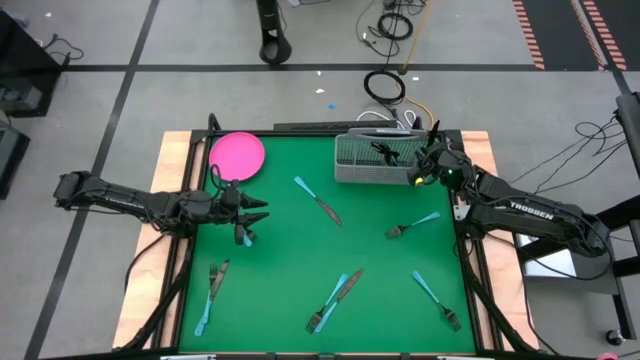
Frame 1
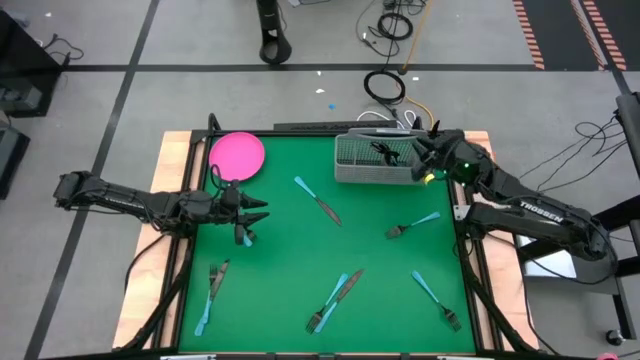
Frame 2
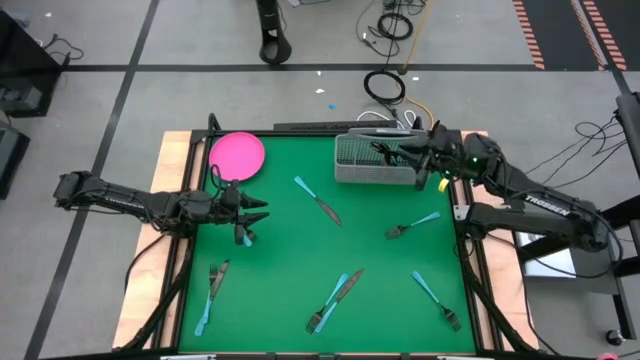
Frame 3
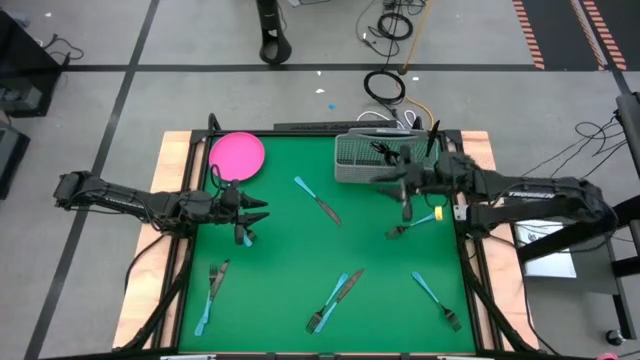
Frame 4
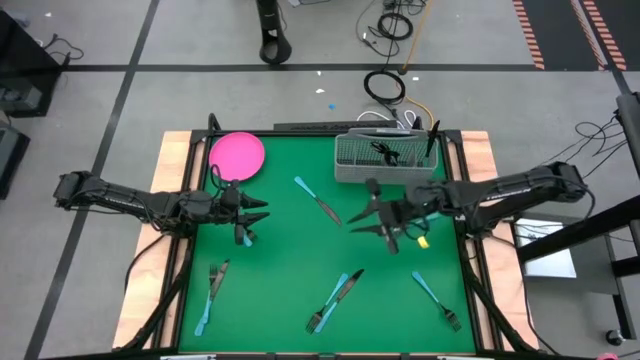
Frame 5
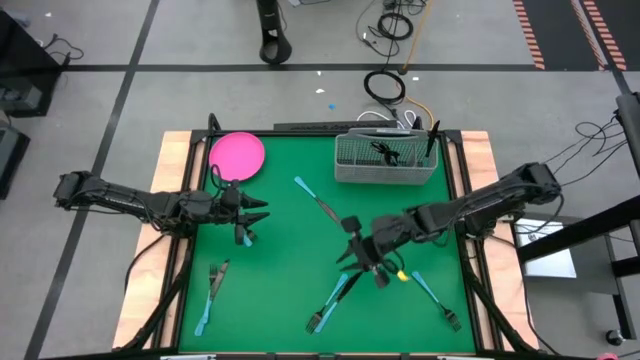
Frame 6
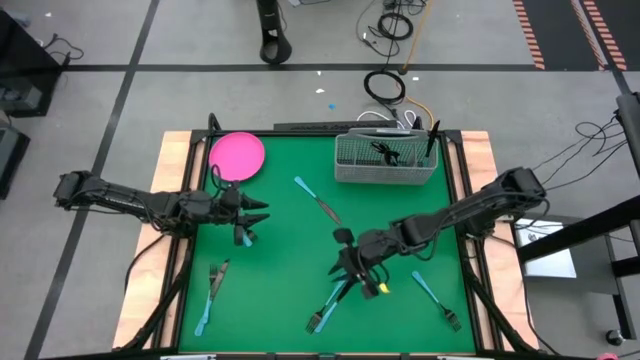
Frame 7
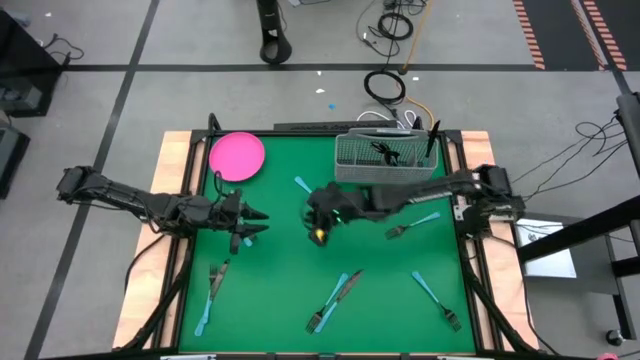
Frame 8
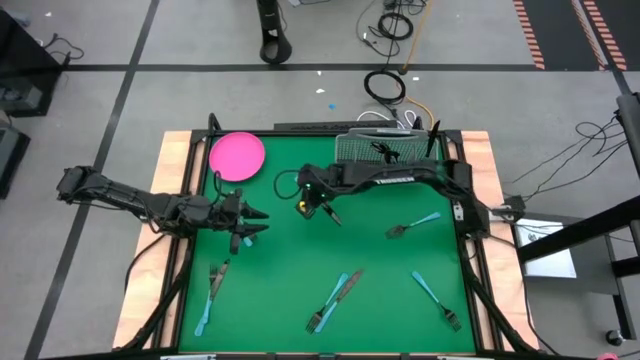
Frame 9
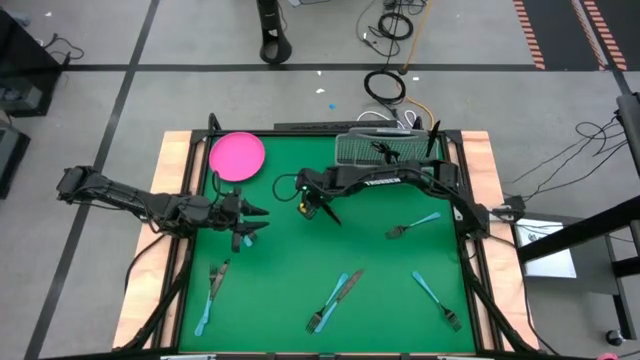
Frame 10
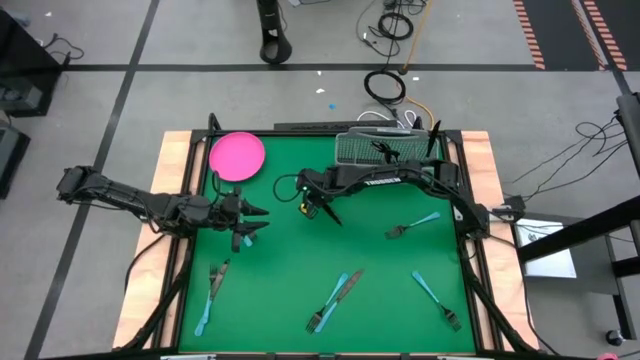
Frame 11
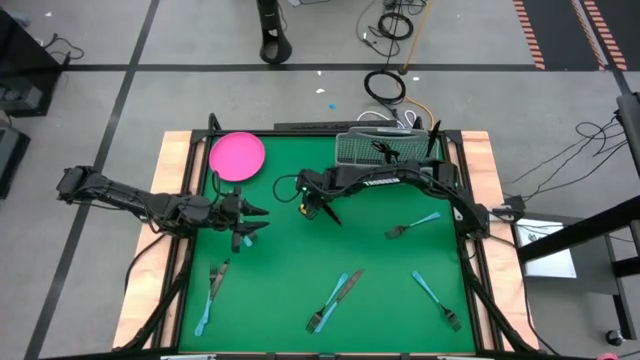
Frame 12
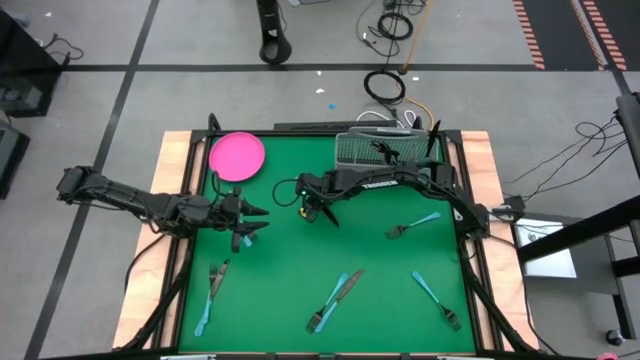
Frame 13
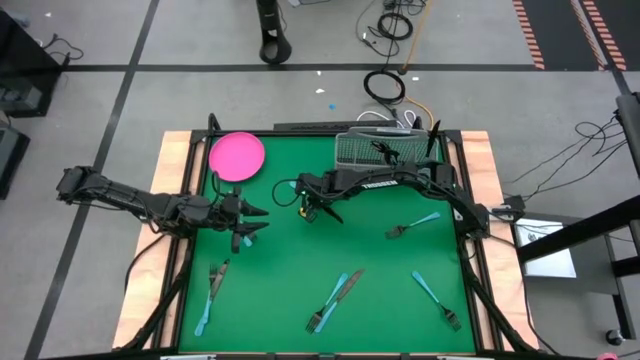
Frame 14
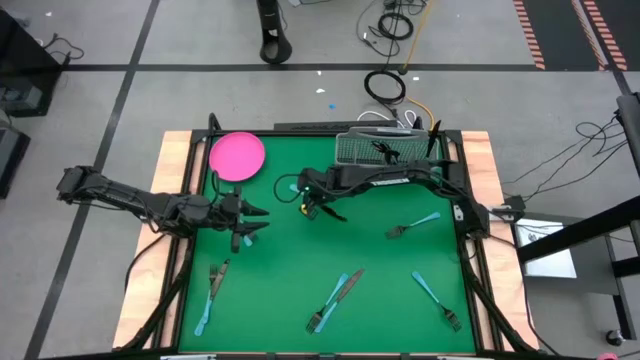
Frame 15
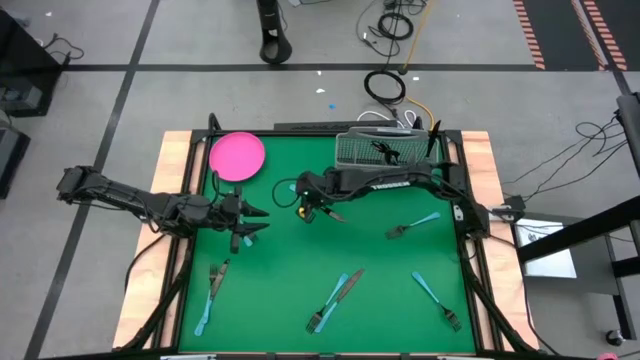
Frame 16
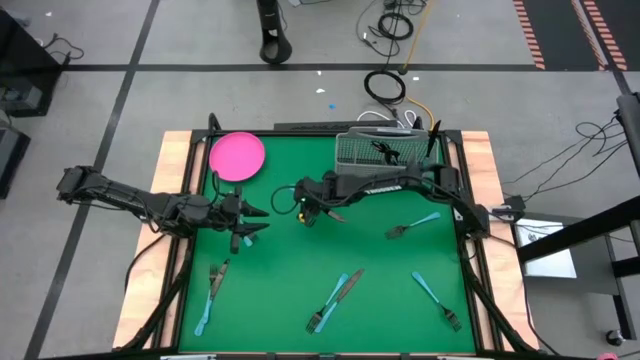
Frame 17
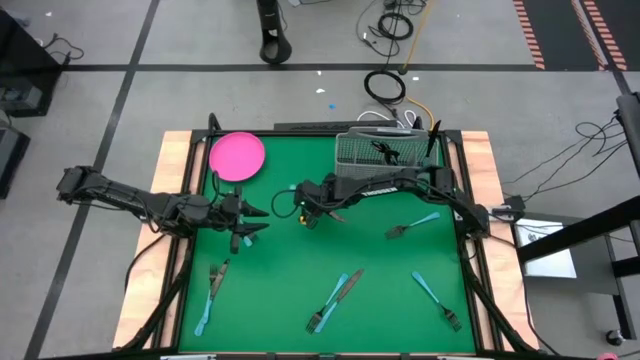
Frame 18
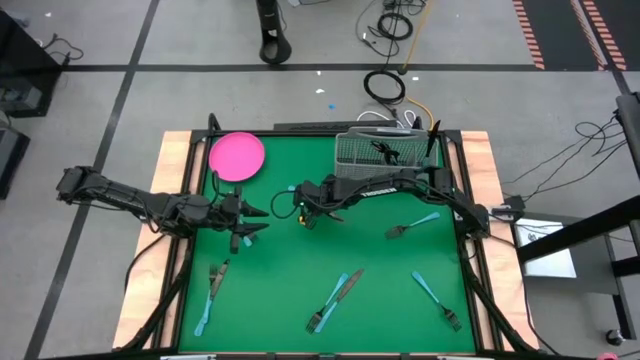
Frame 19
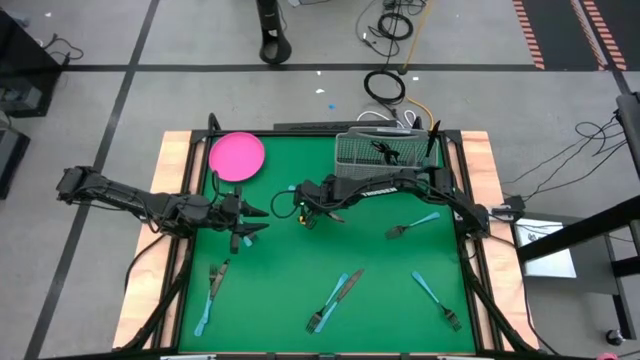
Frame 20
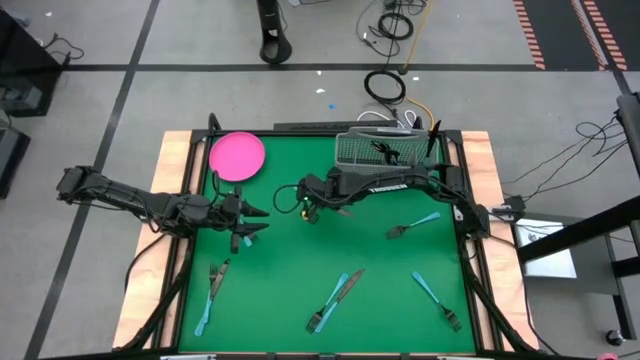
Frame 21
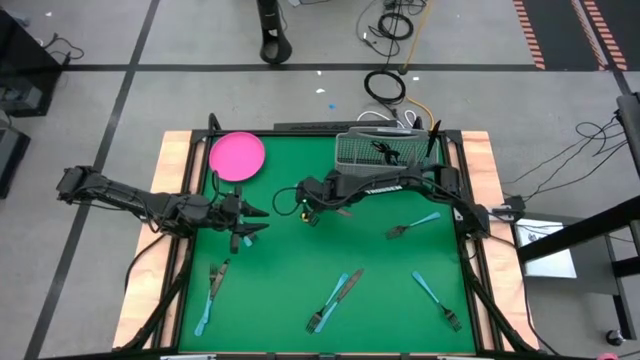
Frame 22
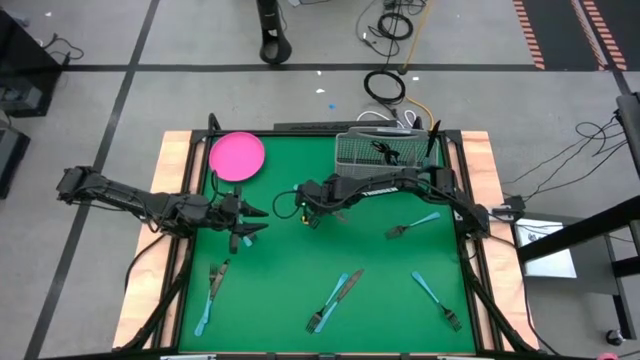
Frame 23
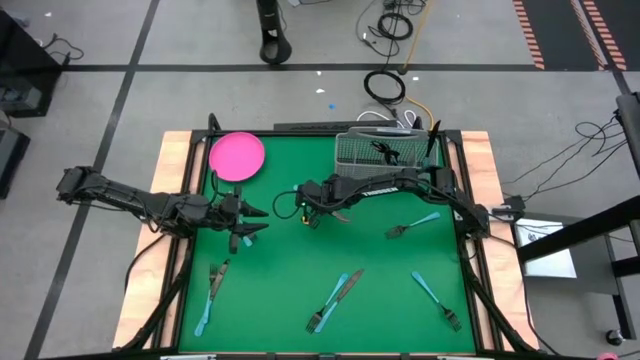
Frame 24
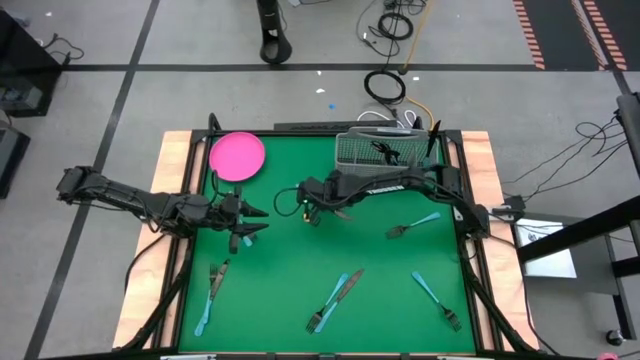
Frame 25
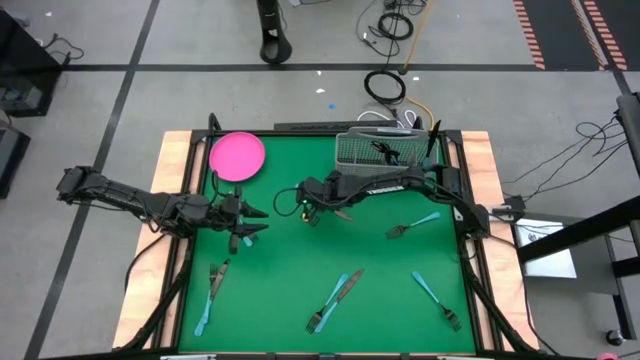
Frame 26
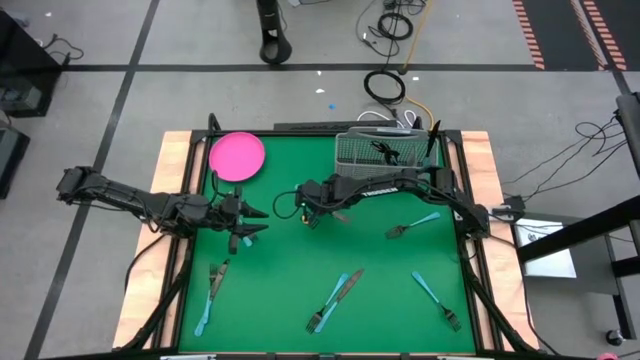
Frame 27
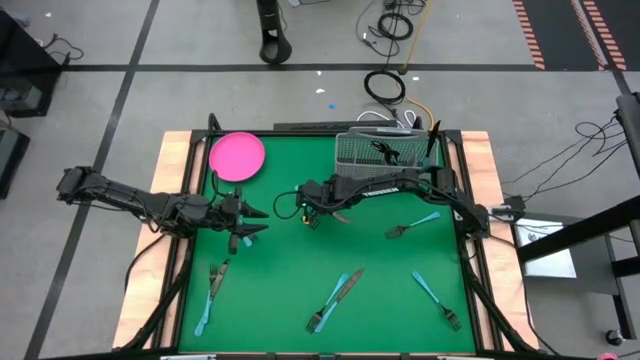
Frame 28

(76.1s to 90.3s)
Task: Sort silverware
Put the top black knife into the cutlery rack with the other black knife

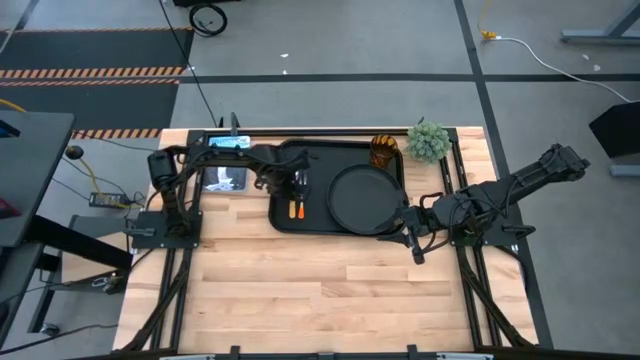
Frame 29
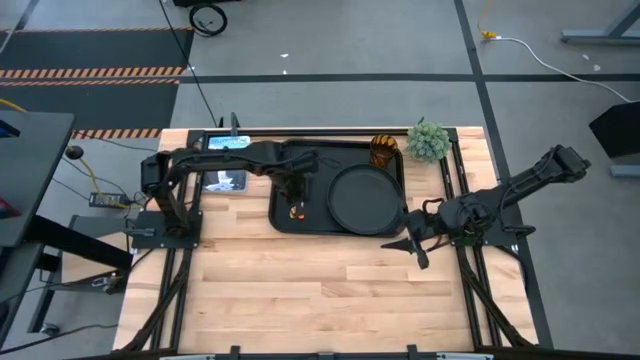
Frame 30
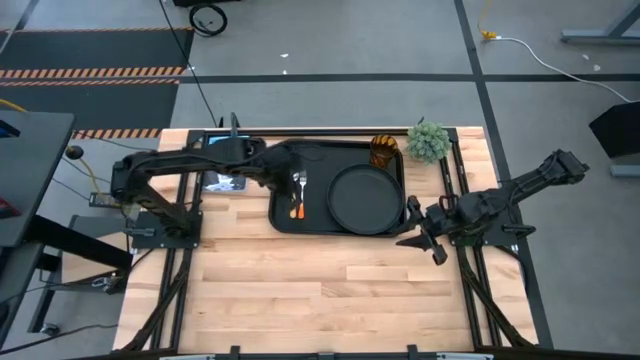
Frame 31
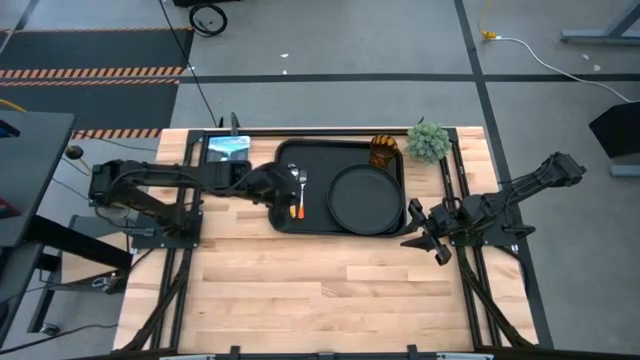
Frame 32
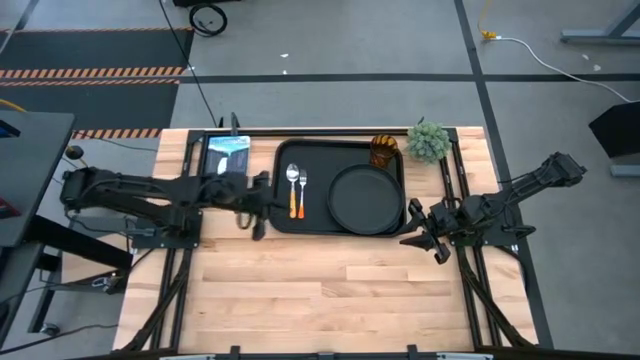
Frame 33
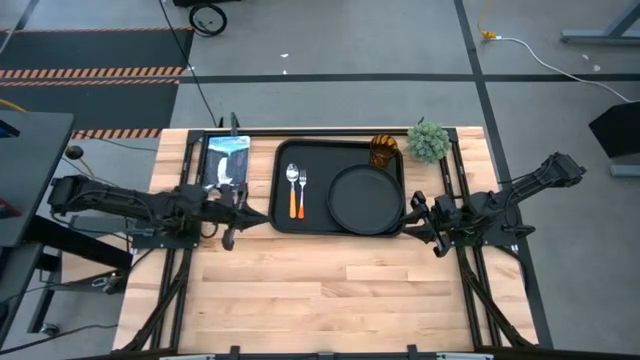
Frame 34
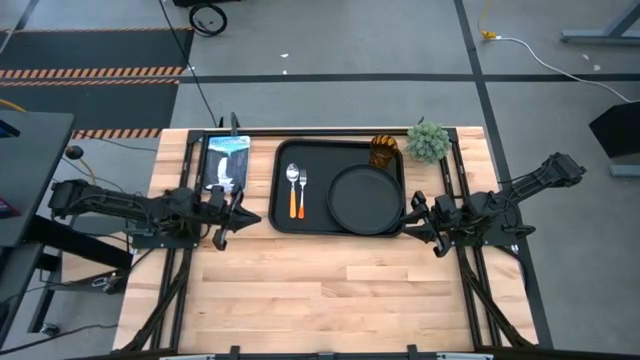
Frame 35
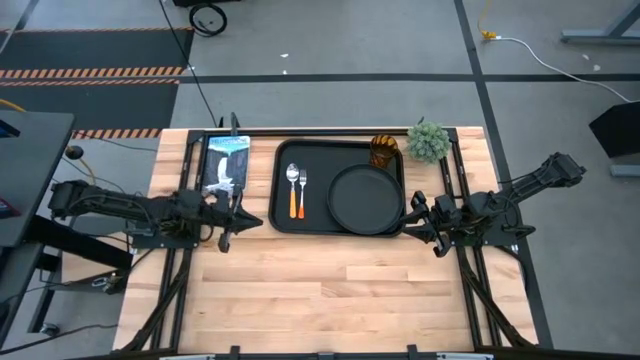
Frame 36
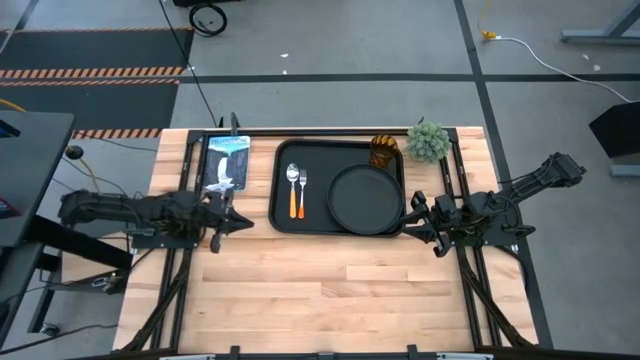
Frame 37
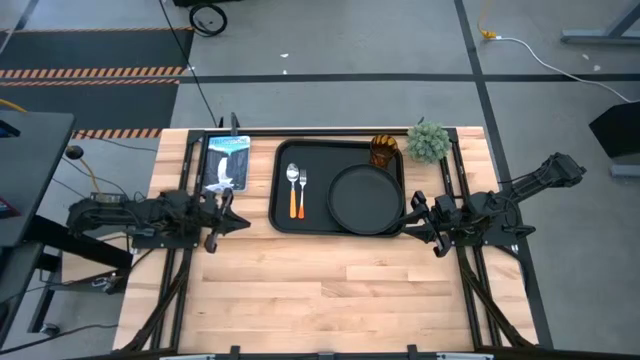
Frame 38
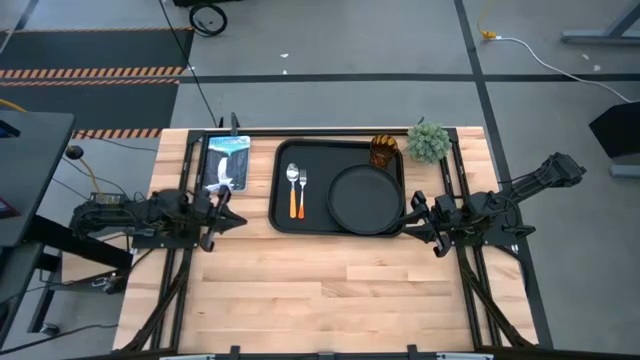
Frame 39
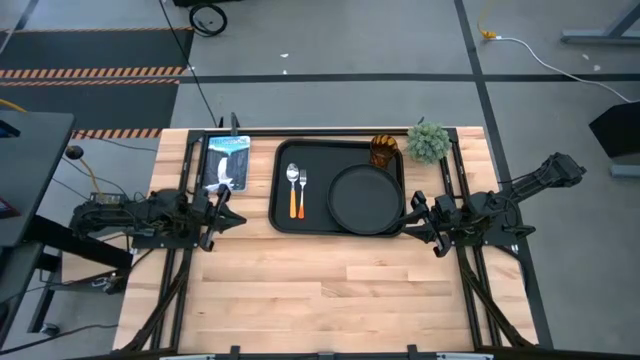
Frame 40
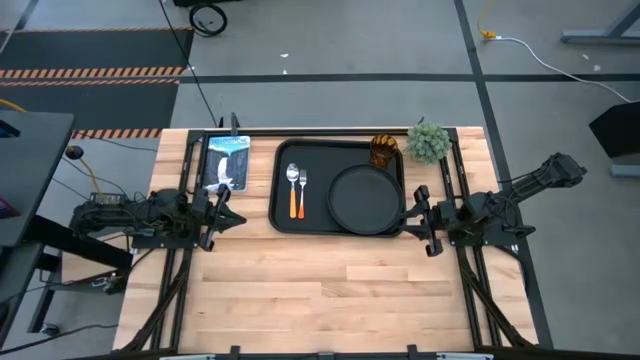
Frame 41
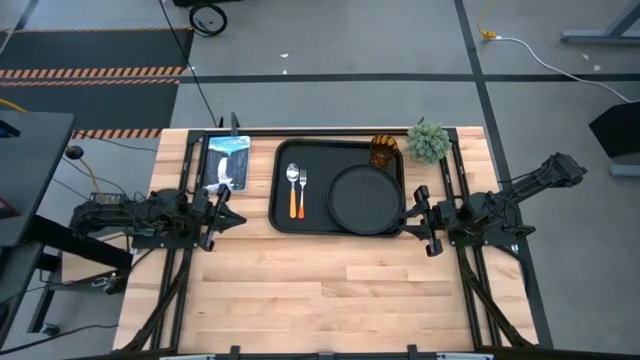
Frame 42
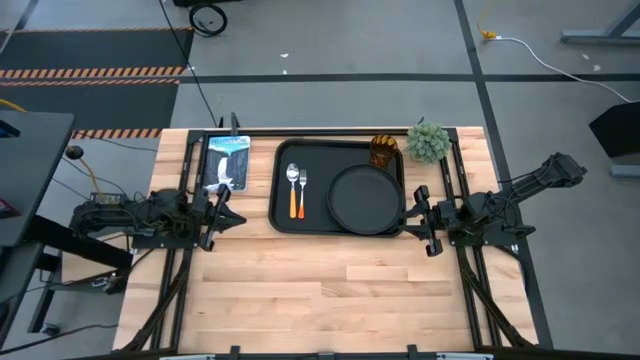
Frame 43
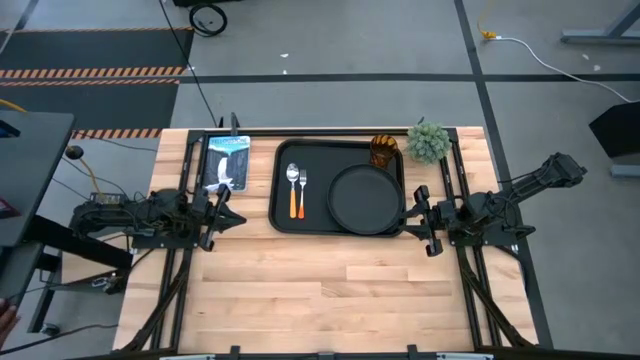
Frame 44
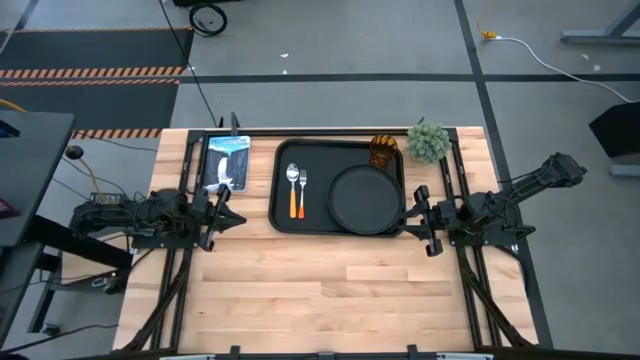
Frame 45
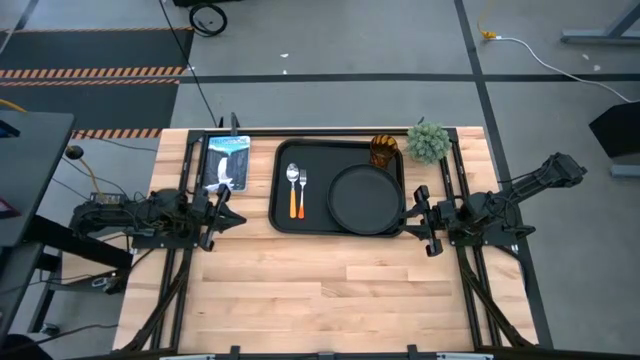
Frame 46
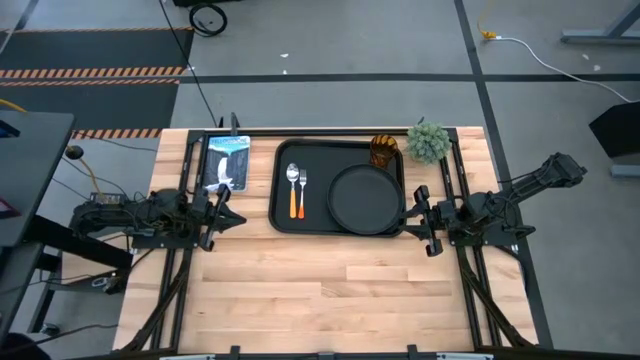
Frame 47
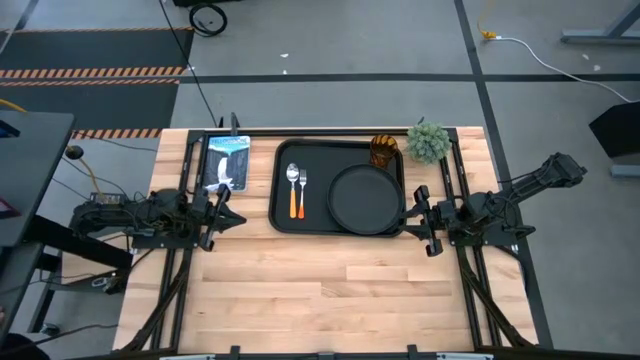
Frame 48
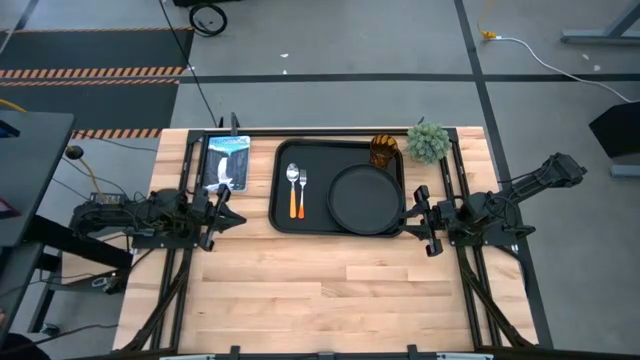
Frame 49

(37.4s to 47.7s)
Task: Pick and place plate/cup/fork/spoon on tray
Return to Home Position
